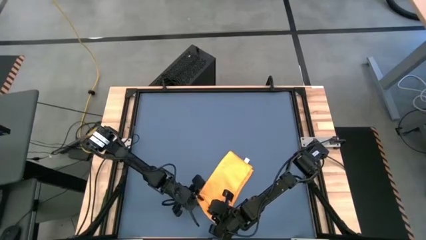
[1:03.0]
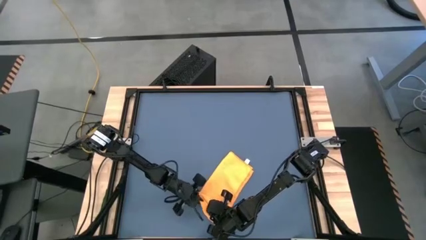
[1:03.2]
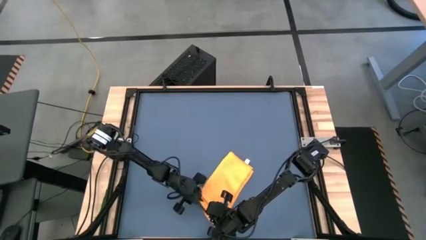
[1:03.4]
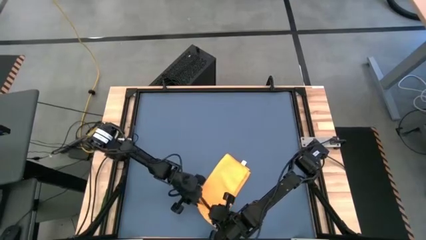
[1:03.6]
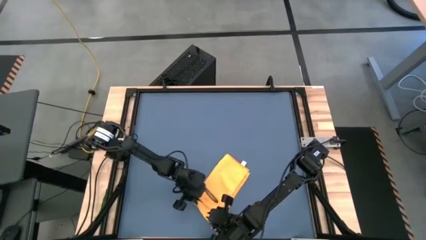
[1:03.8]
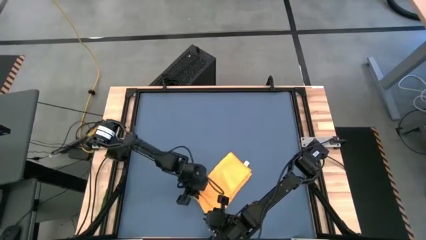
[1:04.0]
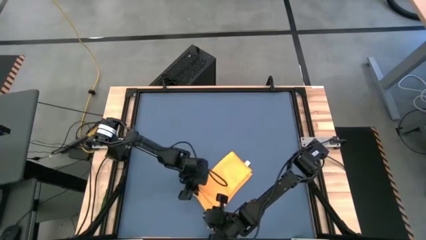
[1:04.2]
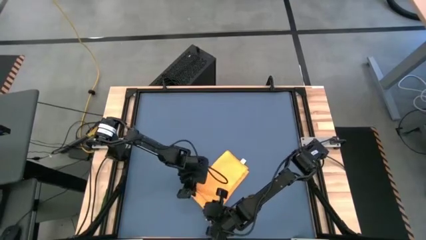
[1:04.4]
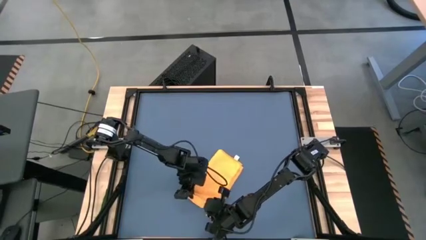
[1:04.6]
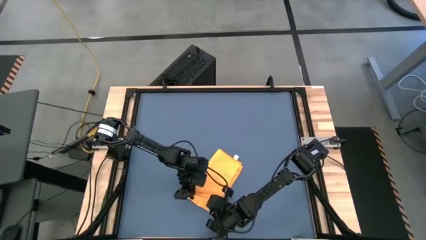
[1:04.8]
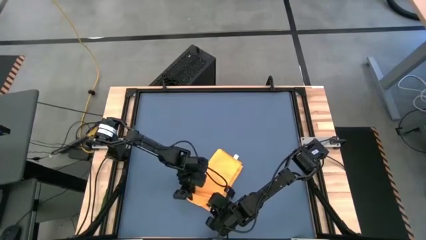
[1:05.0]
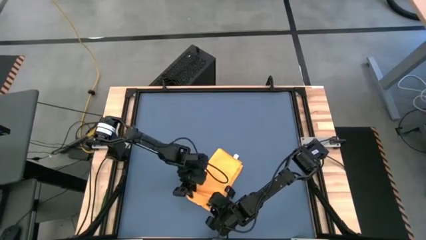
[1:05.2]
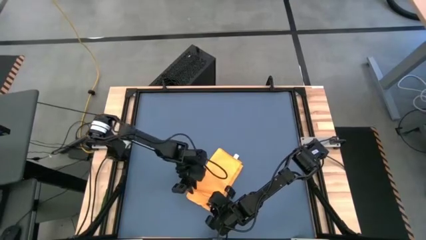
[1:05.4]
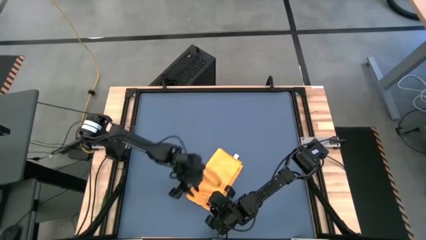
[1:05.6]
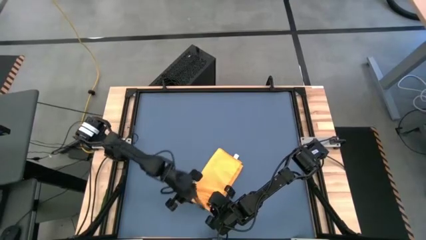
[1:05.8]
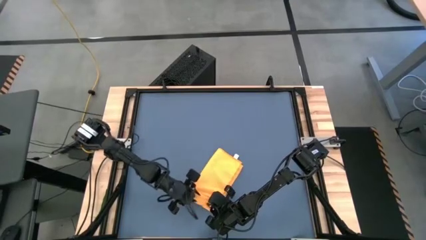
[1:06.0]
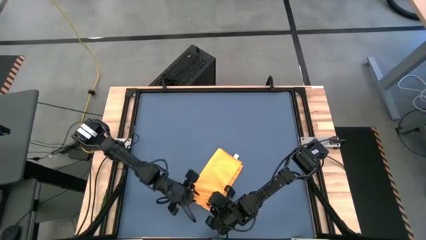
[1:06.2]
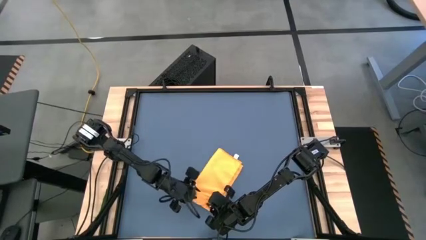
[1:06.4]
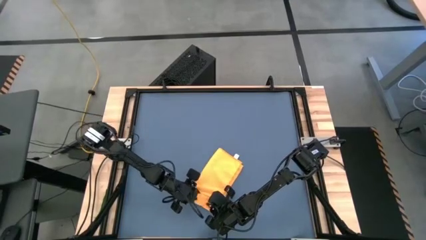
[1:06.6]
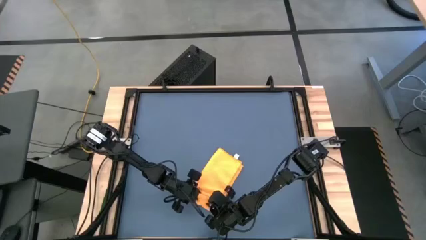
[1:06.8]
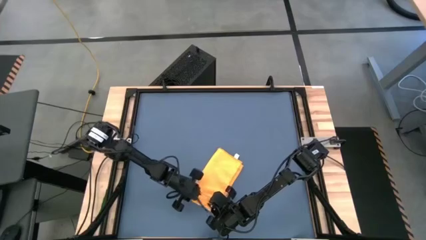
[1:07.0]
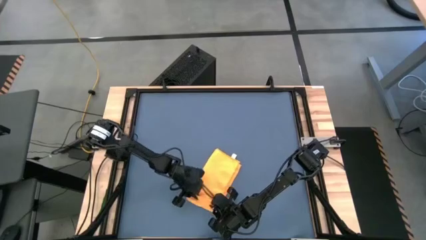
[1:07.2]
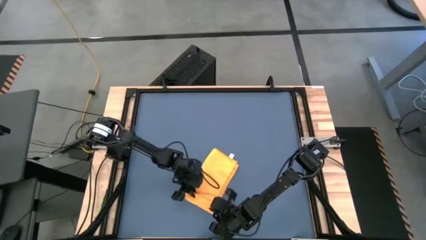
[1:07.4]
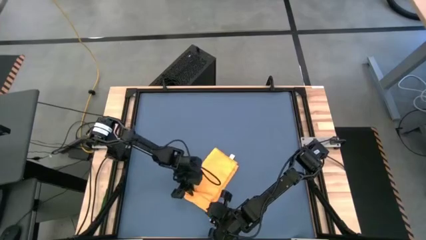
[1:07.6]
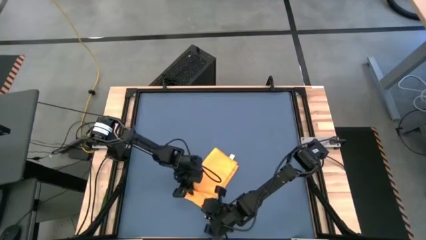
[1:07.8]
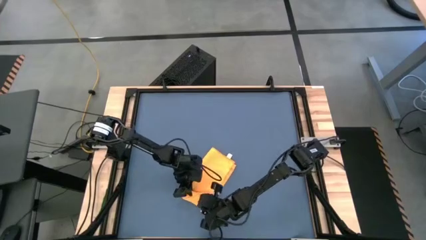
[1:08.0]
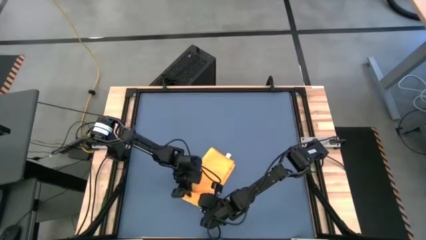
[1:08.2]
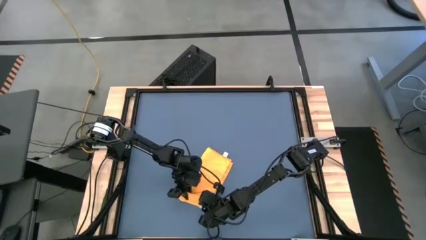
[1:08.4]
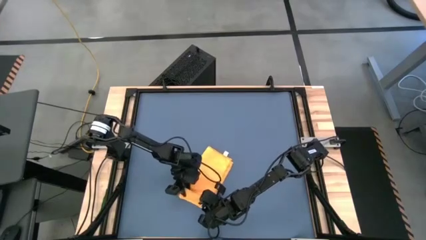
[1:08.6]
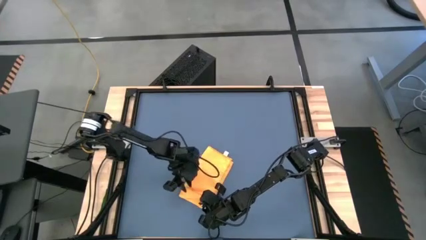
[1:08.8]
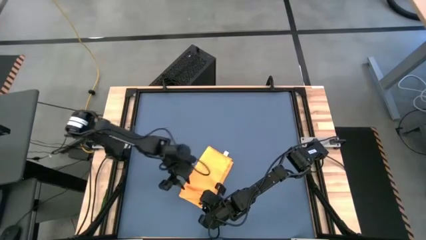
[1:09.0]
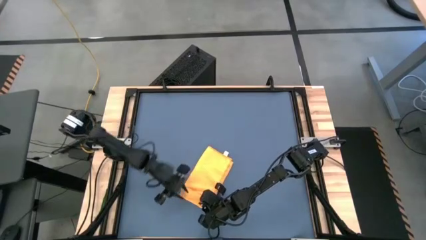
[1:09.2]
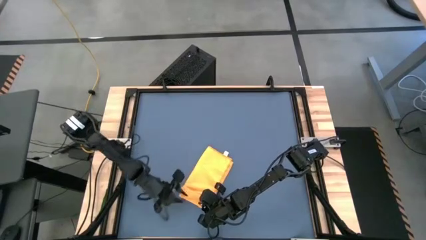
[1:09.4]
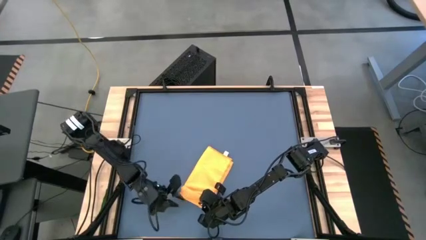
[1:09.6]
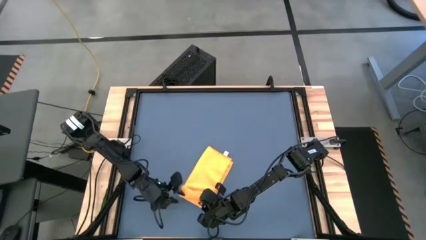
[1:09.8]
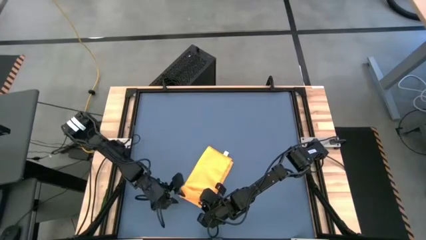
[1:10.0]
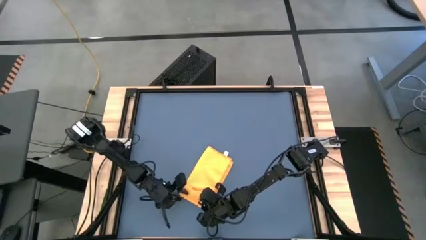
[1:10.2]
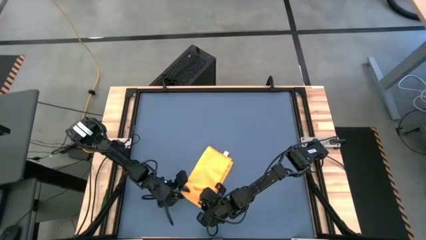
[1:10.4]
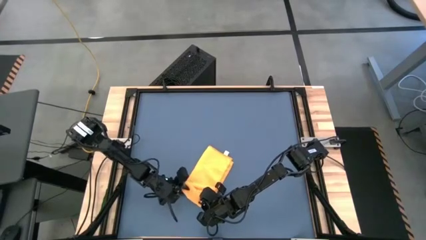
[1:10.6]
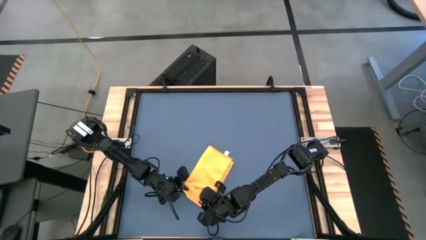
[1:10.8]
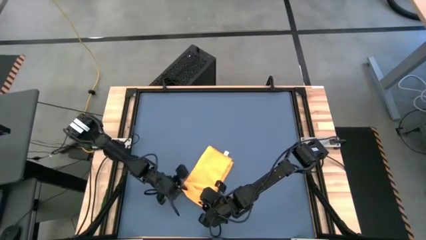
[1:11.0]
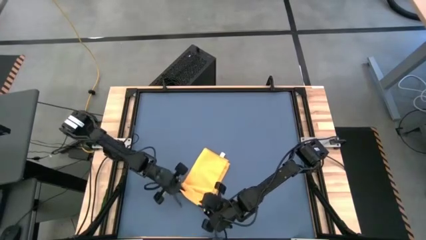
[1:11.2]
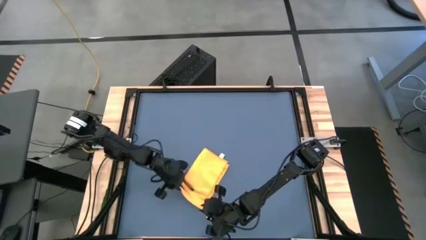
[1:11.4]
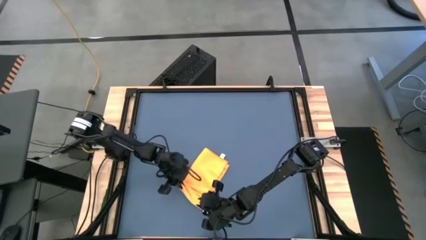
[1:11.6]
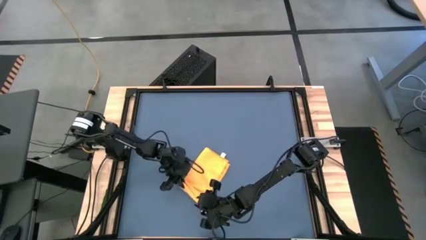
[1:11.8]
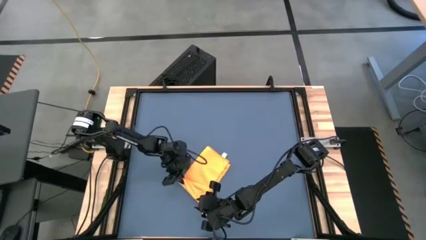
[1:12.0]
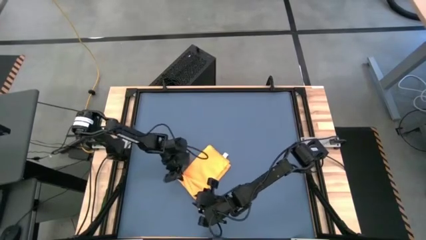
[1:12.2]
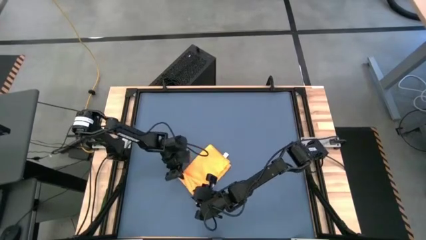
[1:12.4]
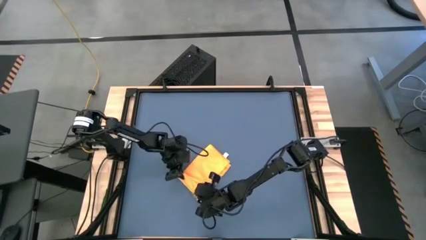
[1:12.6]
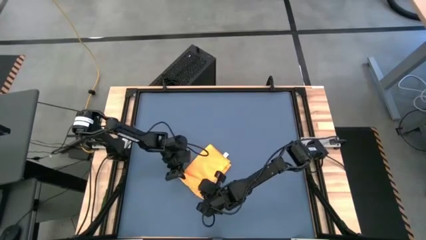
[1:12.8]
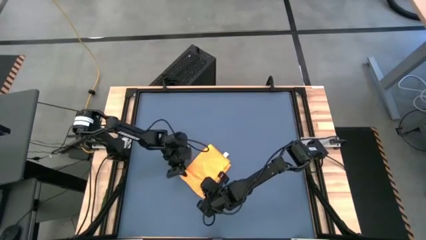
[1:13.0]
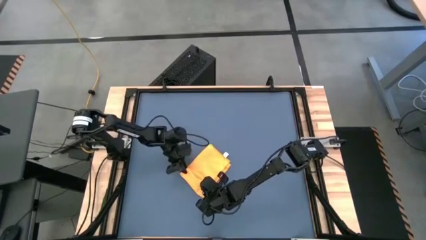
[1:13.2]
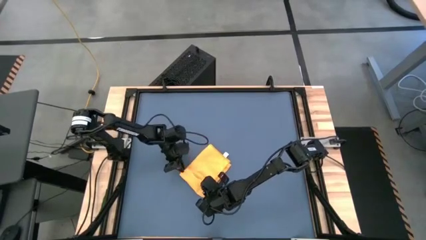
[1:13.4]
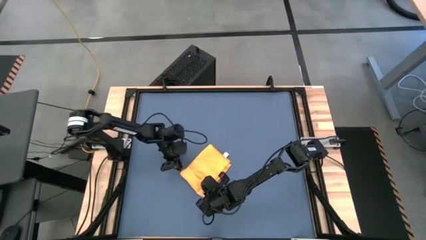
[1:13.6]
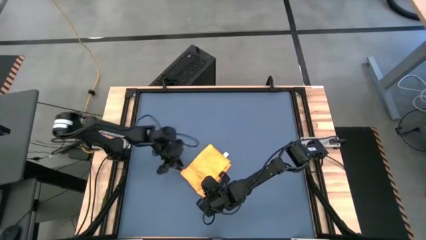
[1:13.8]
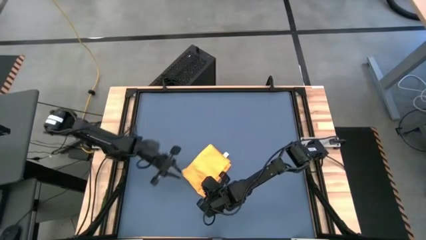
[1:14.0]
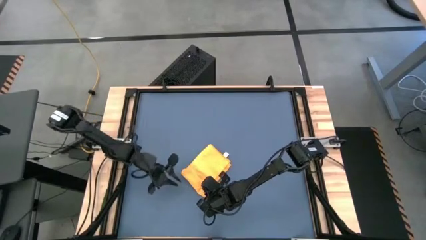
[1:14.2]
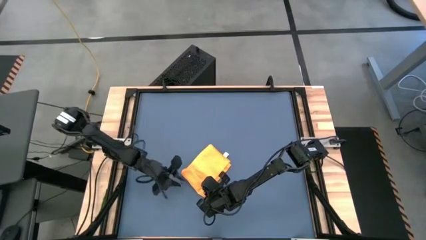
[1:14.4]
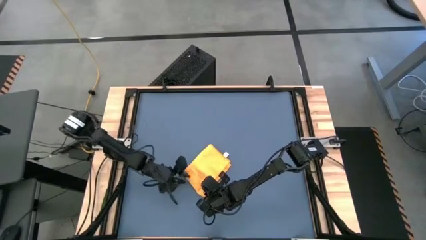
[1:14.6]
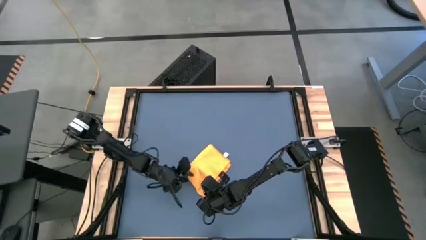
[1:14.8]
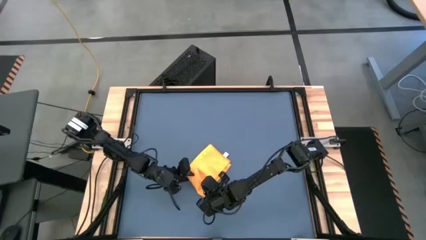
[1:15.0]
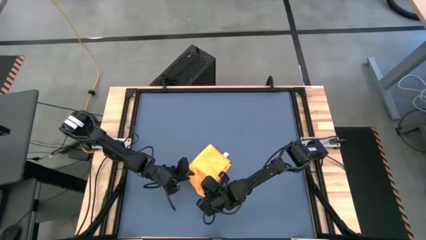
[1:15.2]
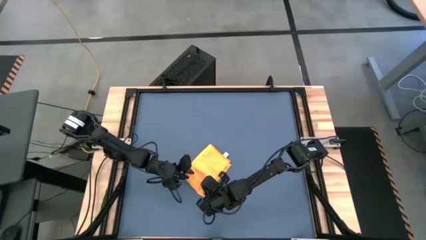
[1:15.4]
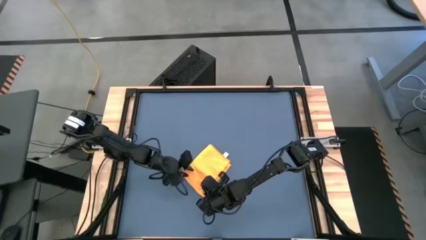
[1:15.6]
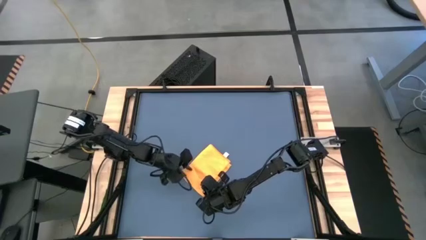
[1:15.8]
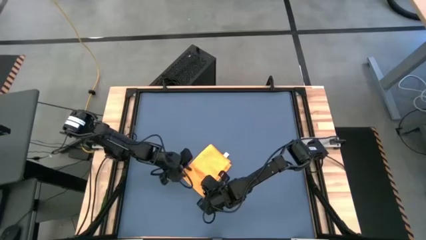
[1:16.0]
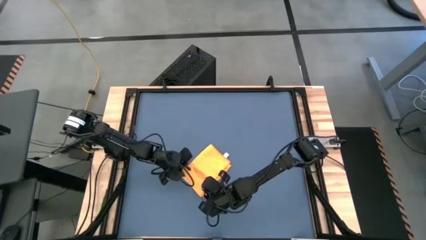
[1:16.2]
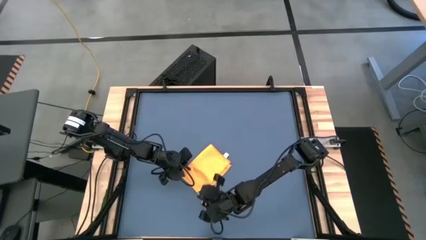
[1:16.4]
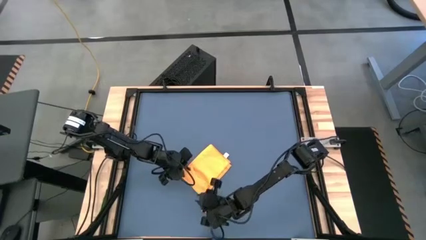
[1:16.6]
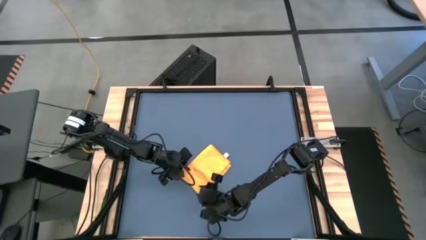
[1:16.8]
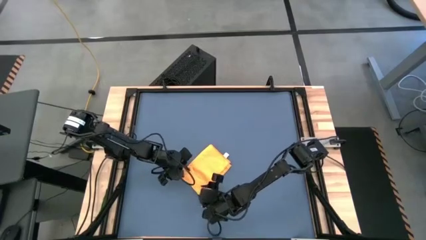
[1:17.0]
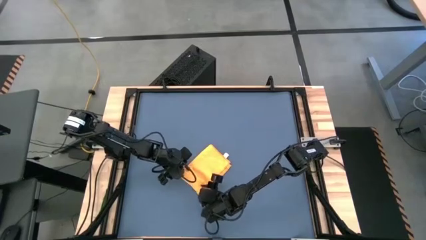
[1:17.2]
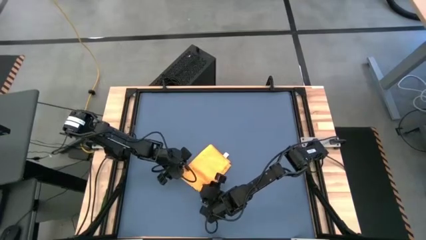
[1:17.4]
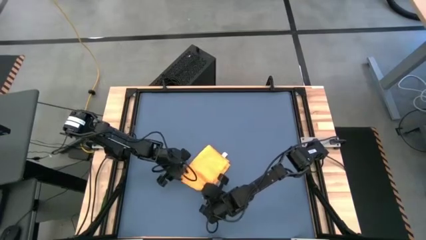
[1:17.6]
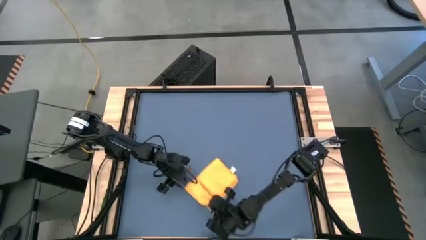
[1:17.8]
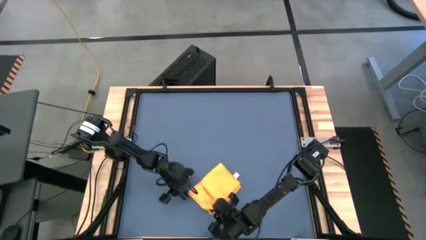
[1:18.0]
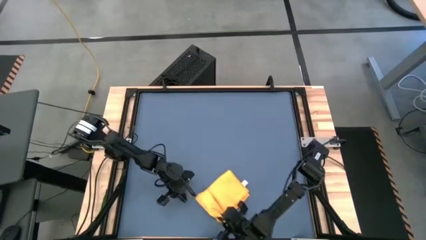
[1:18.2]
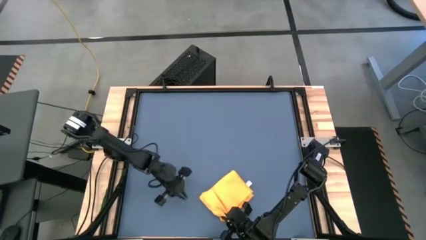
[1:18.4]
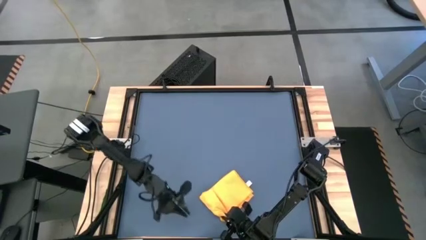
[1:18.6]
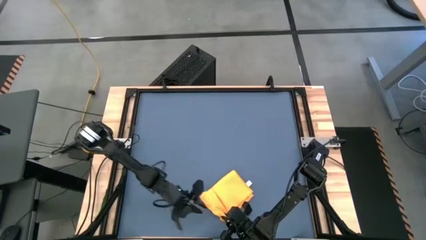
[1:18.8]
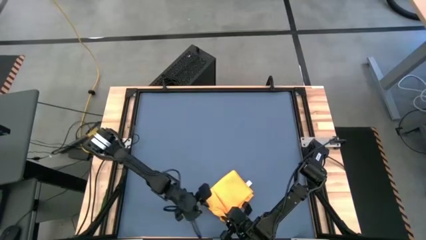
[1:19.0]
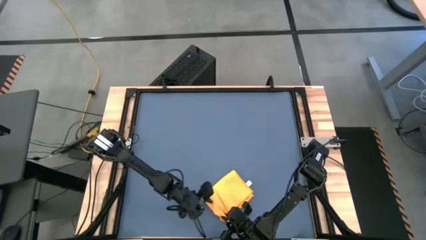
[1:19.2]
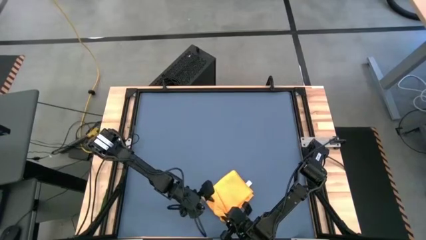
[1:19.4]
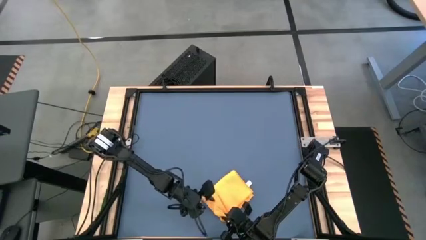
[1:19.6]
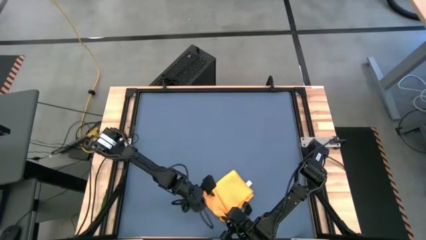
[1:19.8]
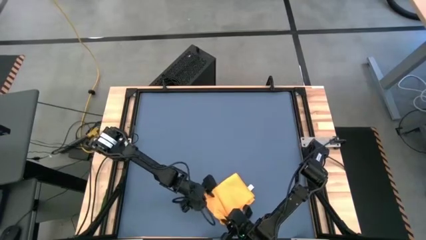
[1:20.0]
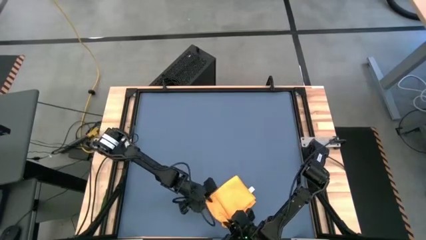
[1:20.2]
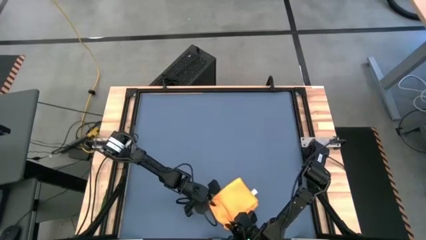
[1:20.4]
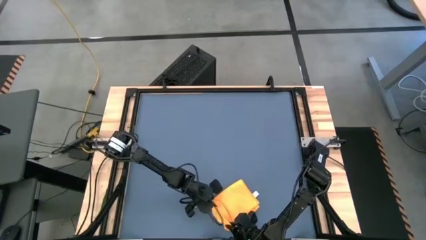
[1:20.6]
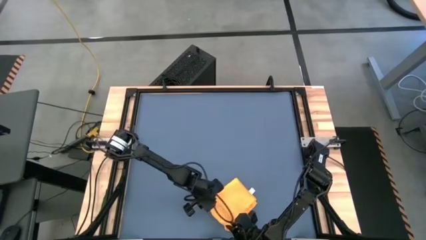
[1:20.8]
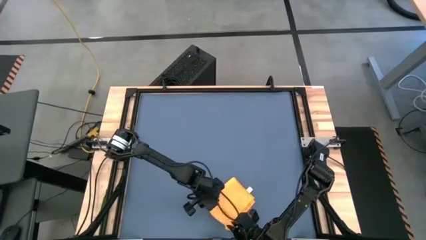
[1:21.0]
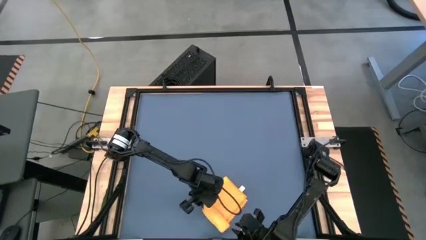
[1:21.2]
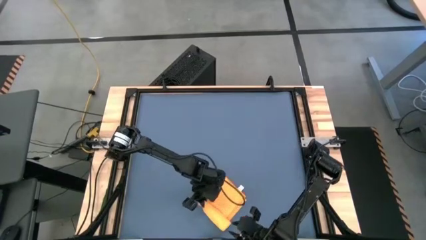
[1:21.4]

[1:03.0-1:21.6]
Task: Roll towel
Roll the orange microfiber cloth
